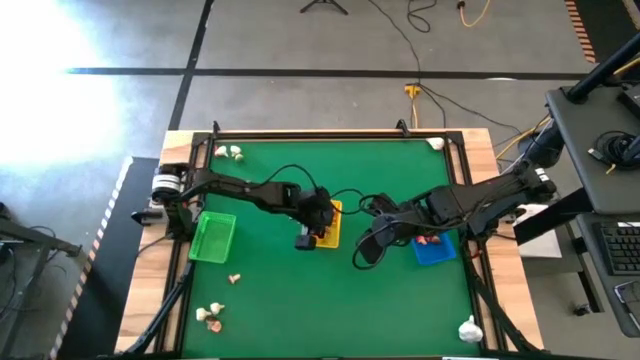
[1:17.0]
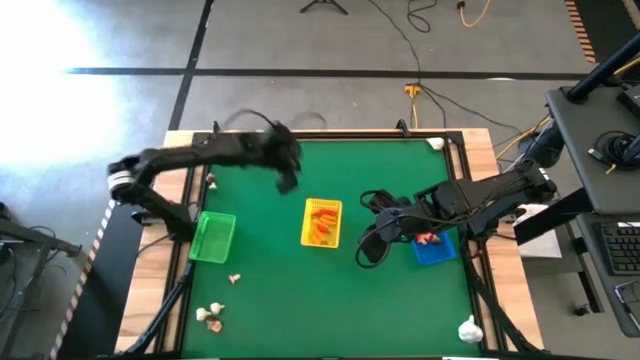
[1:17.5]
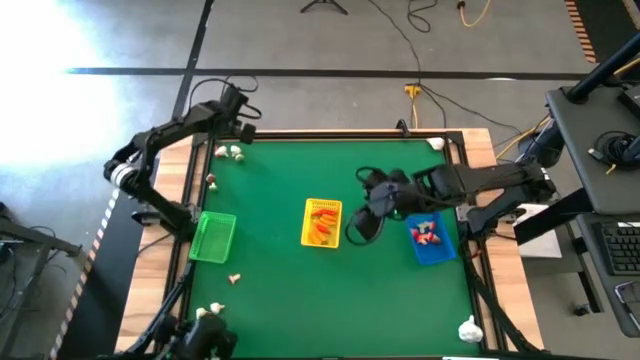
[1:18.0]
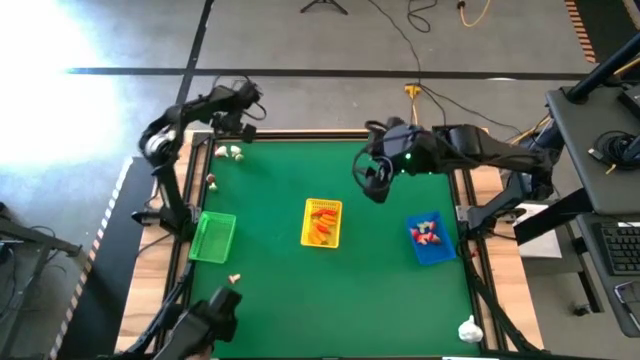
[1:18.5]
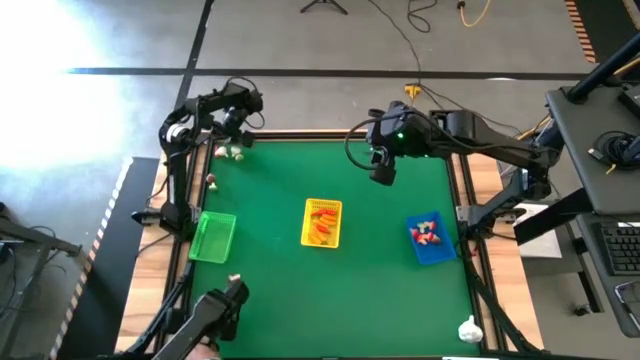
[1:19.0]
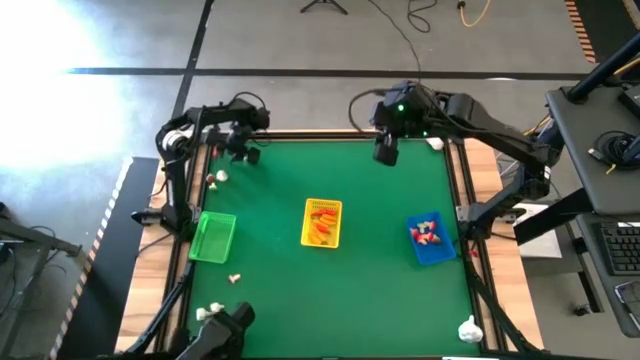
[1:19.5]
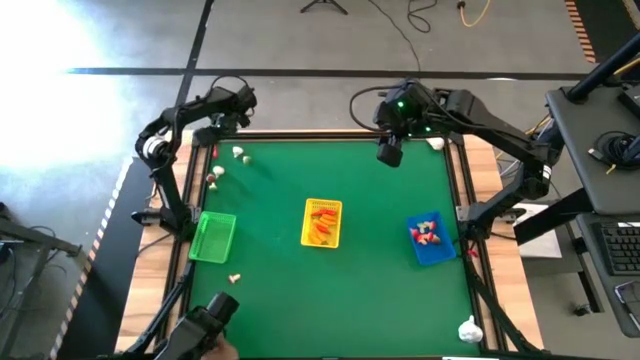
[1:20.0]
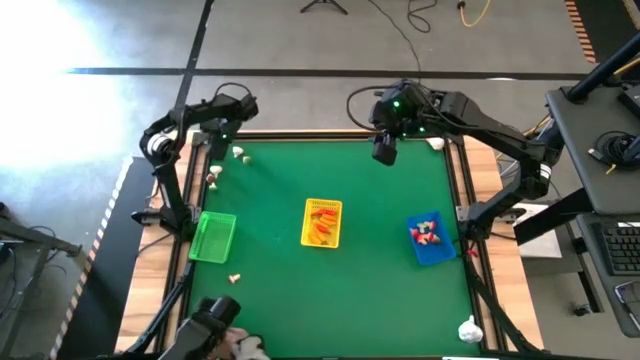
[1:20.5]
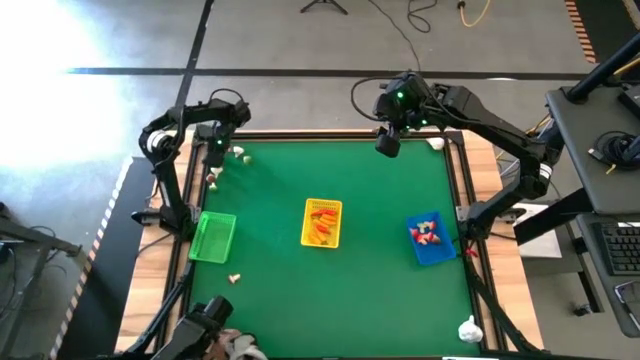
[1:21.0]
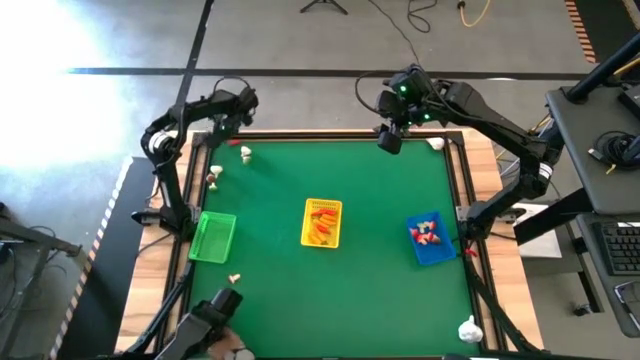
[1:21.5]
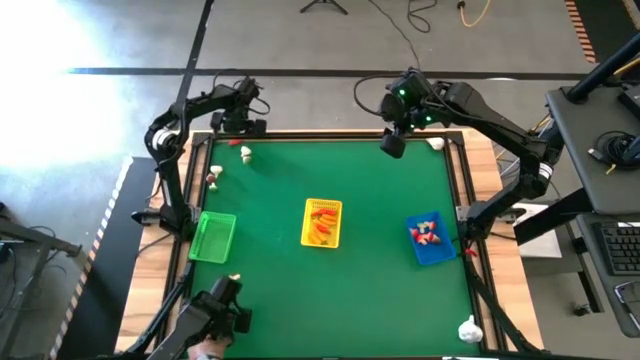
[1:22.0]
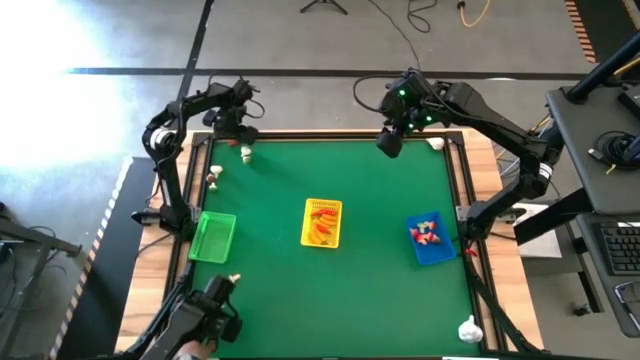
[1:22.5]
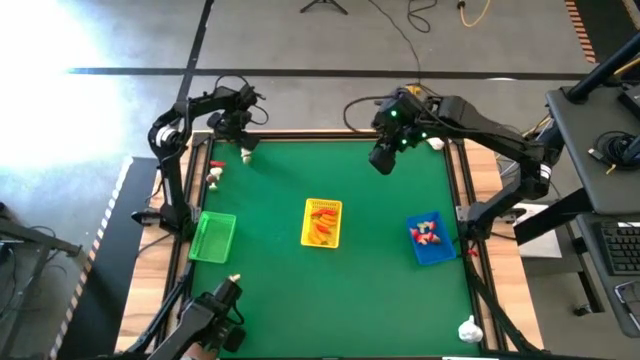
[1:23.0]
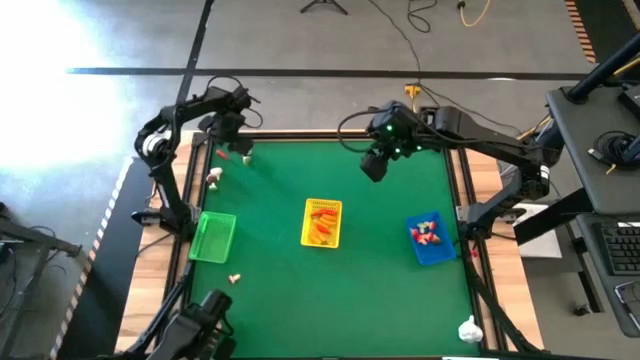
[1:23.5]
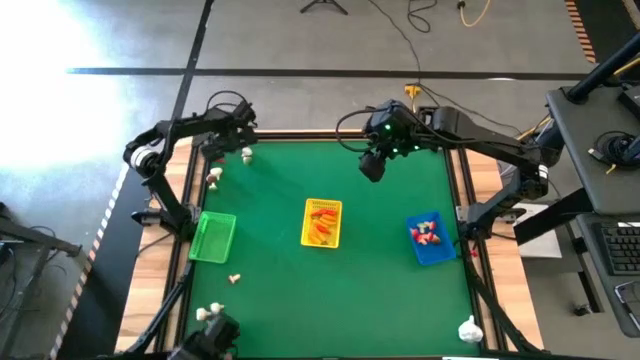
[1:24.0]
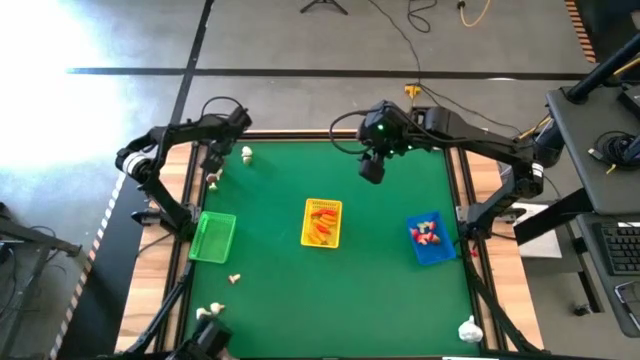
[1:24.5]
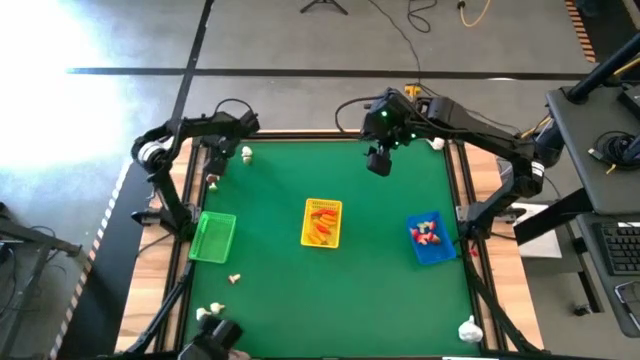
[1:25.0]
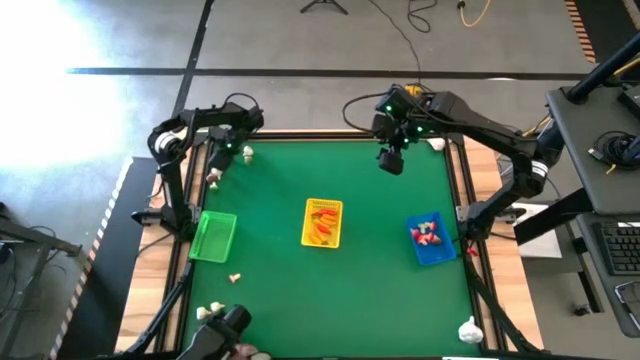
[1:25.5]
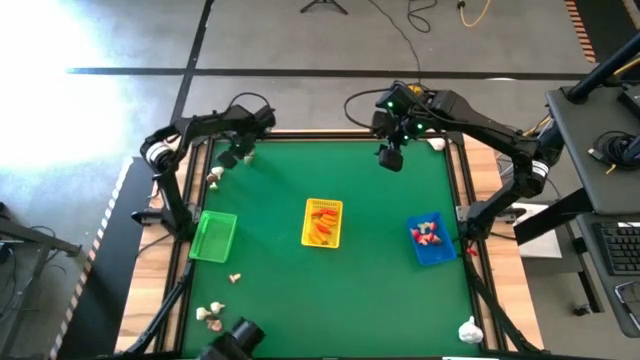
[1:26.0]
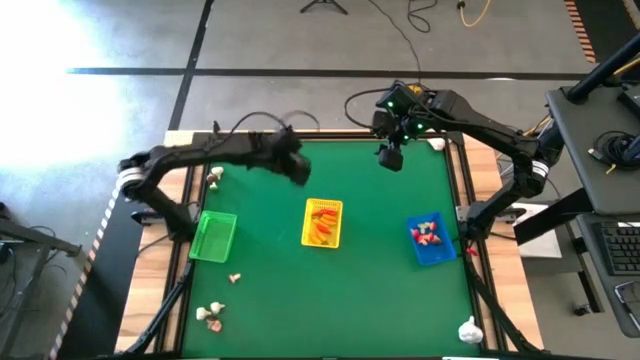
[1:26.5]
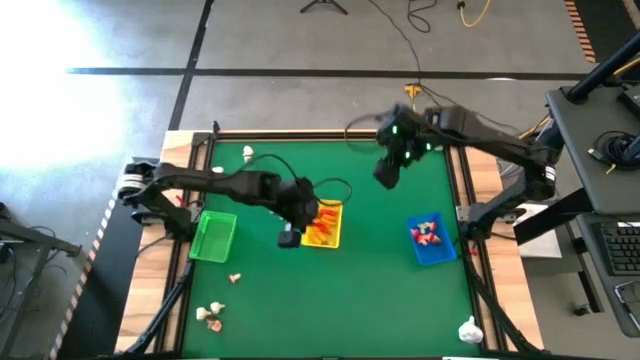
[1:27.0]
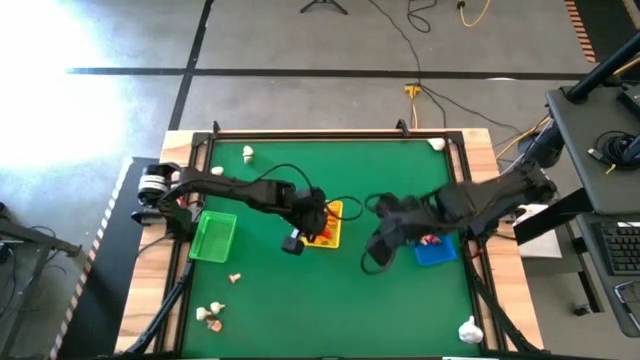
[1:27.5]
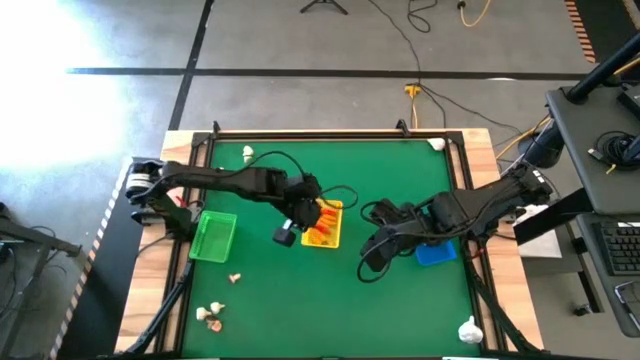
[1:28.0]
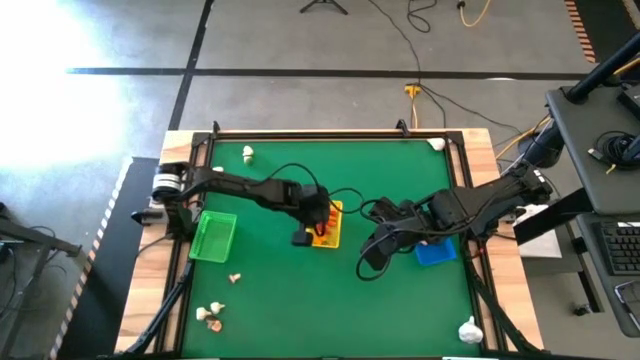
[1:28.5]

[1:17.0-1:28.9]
Task: Sort produce into baskets
Put the red chili pepper into the yellow bin

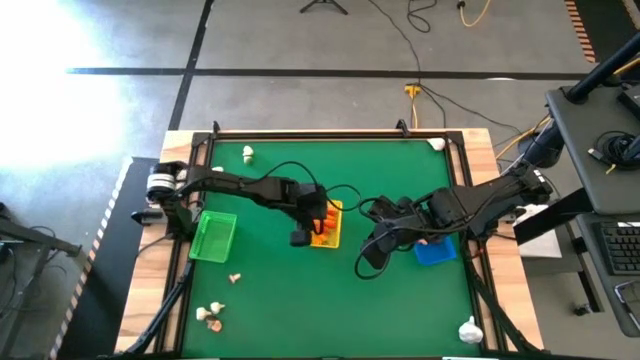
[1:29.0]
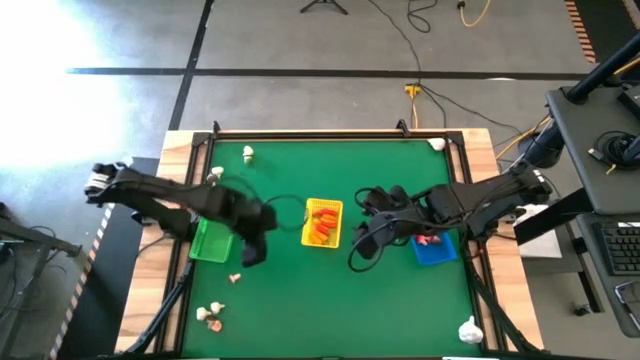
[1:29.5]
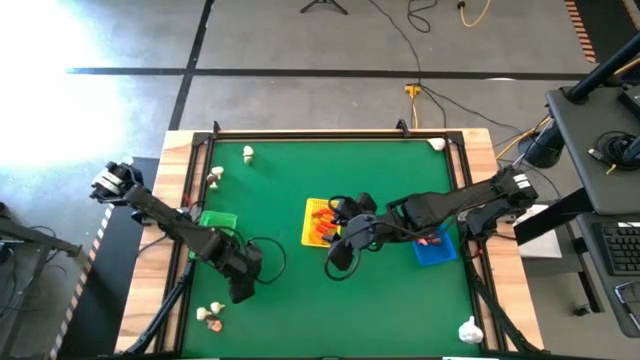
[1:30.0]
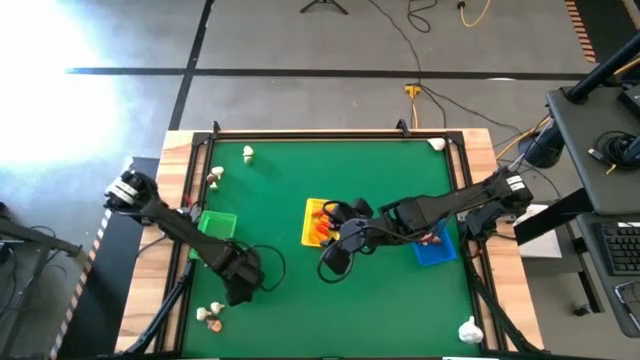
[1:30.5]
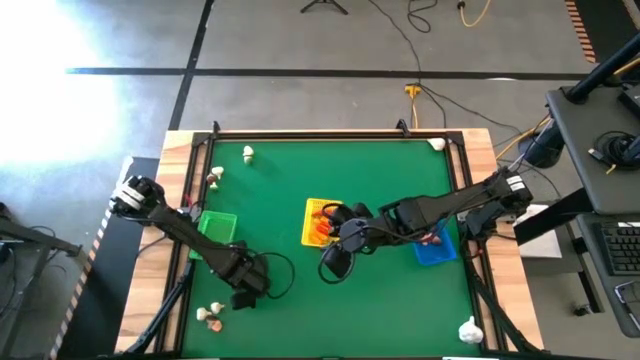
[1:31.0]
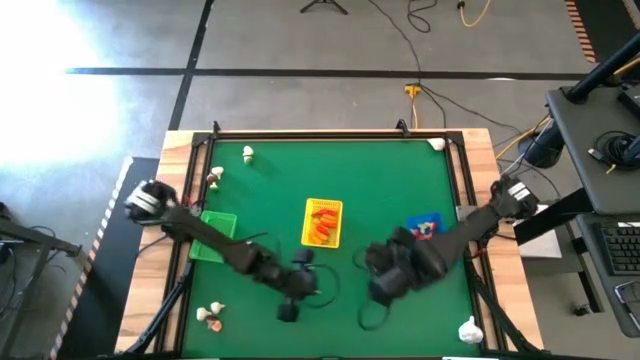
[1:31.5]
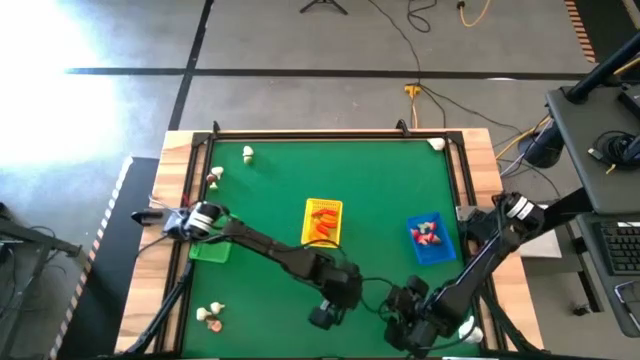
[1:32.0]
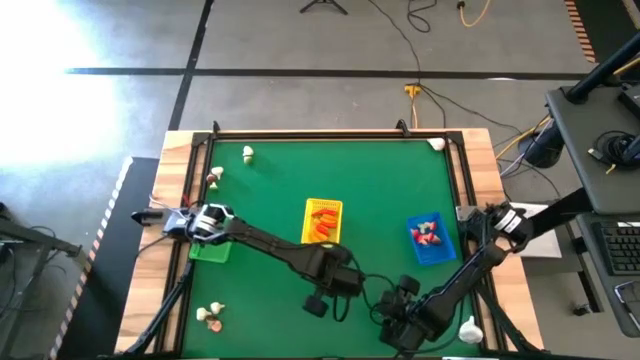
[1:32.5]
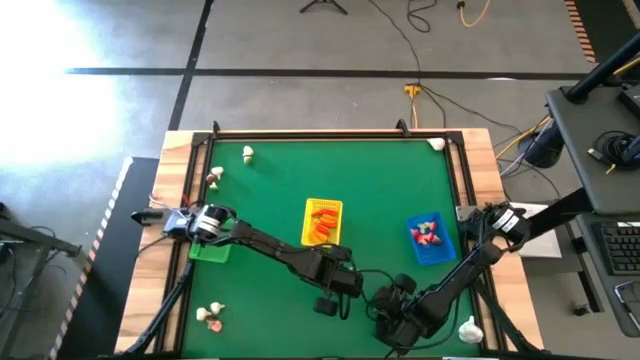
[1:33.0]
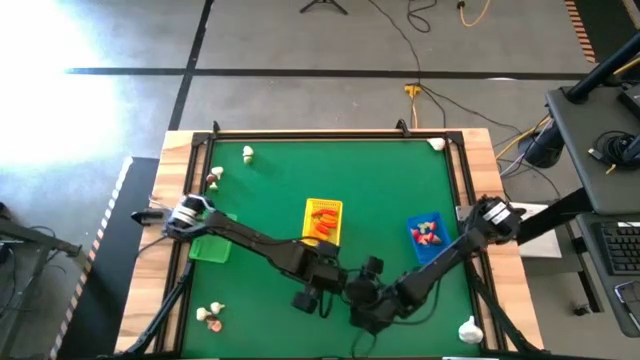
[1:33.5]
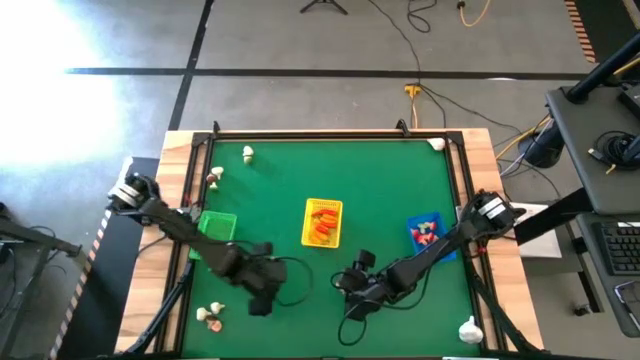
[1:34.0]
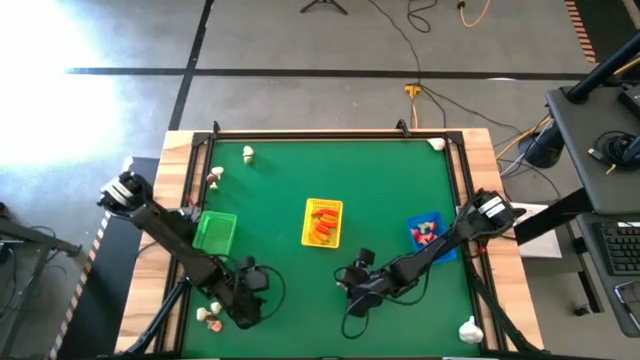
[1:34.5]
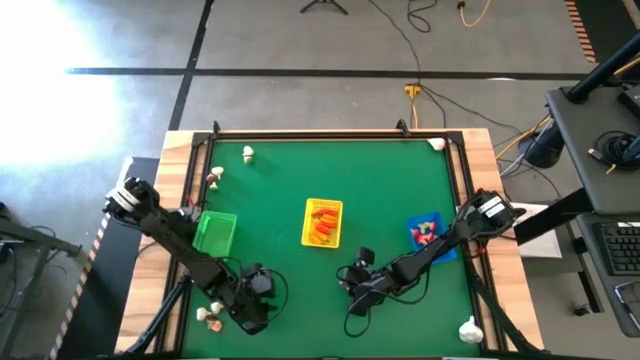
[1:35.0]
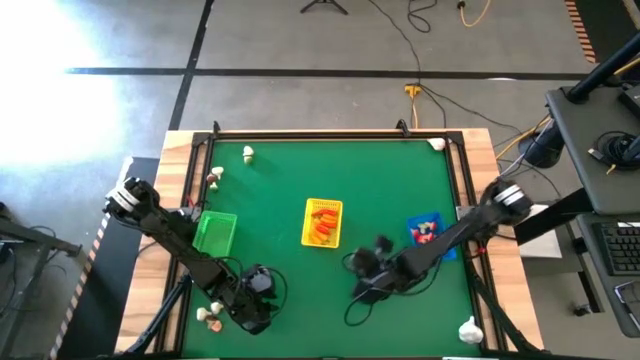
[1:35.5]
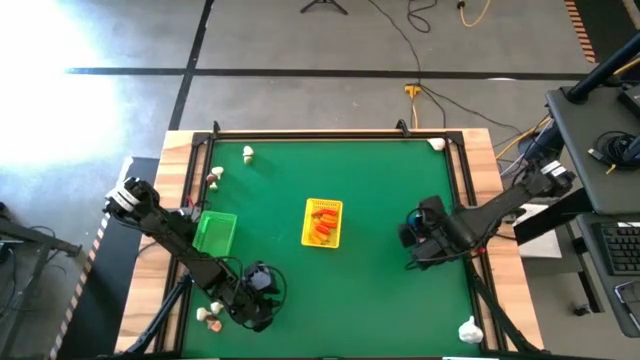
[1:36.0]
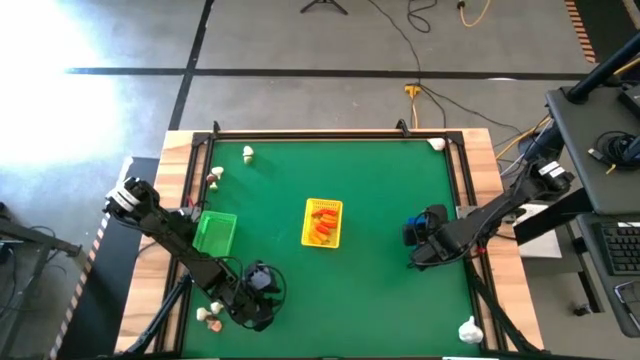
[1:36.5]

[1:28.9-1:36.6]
Put the brown mushroom into the blue bin

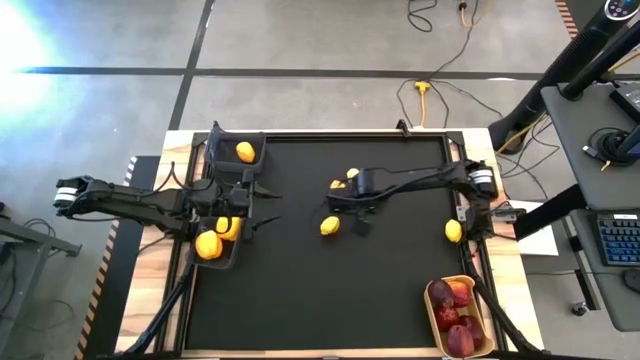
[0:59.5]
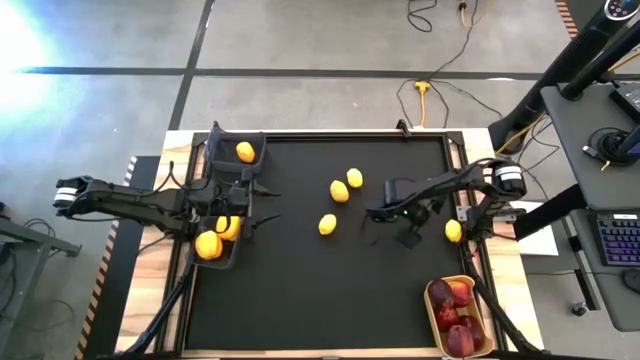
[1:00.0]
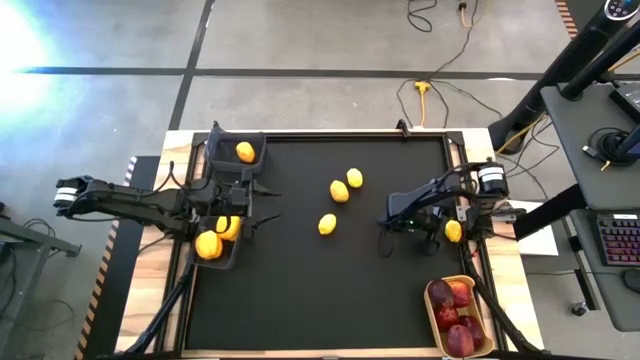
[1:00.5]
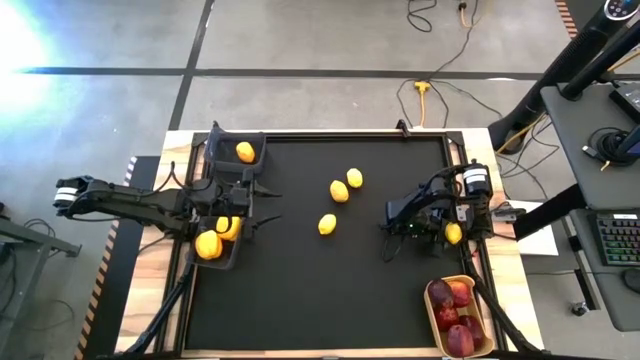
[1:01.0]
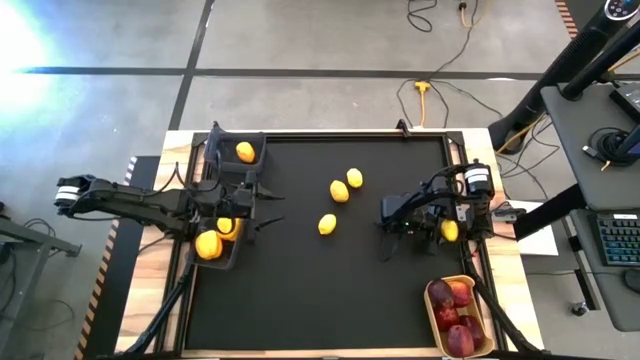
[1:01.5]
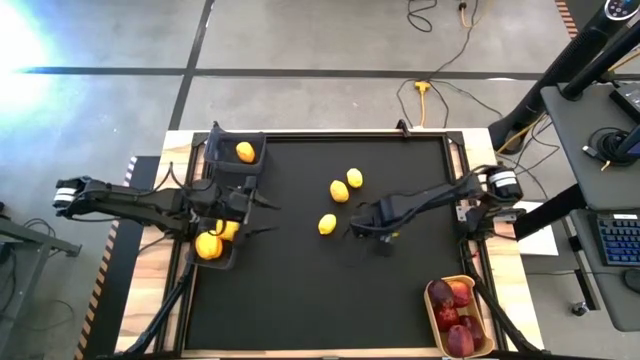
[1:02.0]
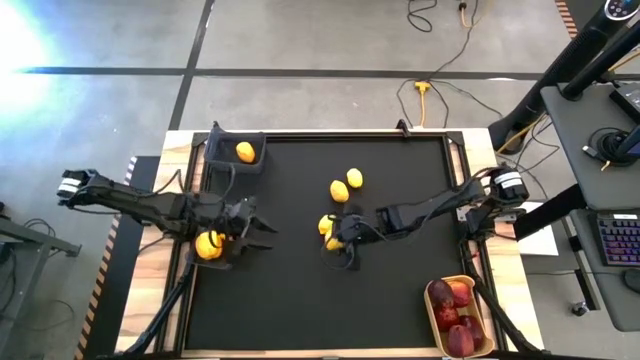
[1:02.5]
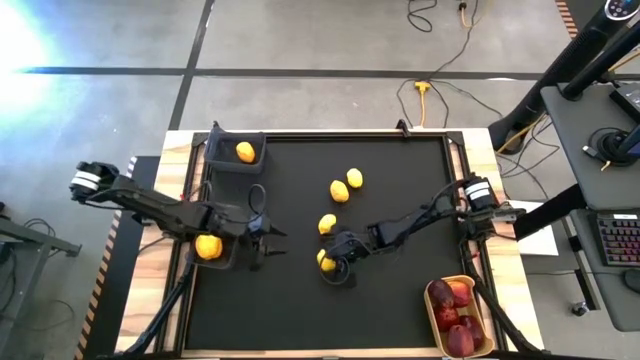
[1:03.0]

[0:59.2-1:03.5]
Task: Sort produce into baskets
Move the lemon to the center of the table
